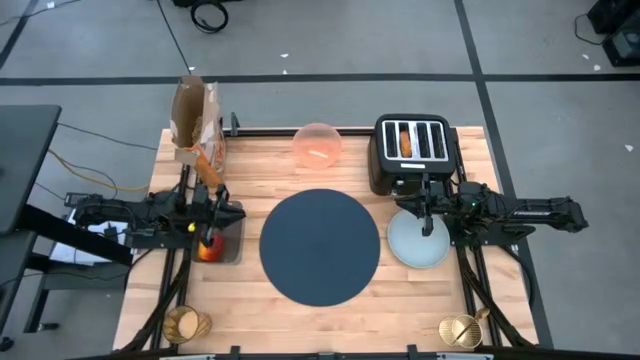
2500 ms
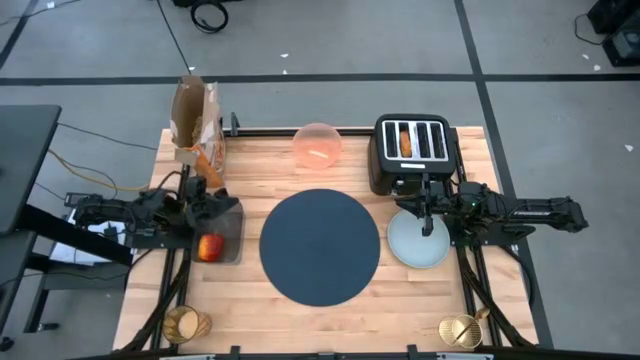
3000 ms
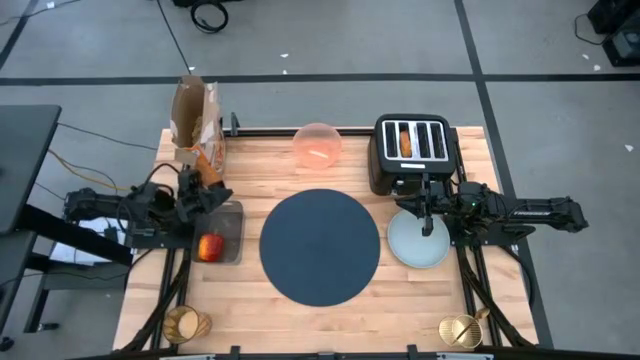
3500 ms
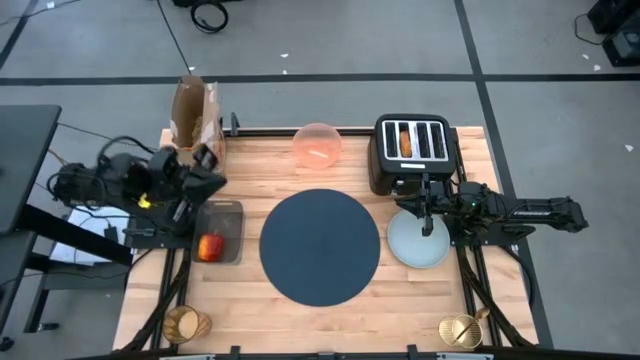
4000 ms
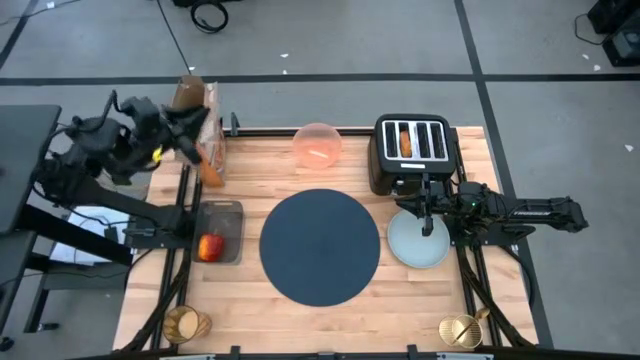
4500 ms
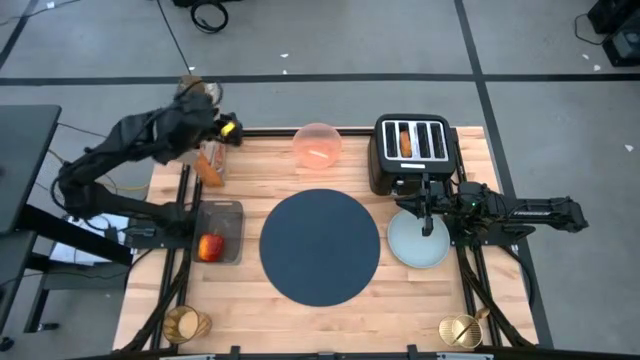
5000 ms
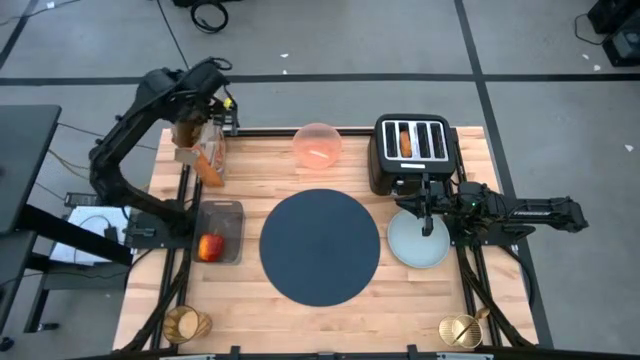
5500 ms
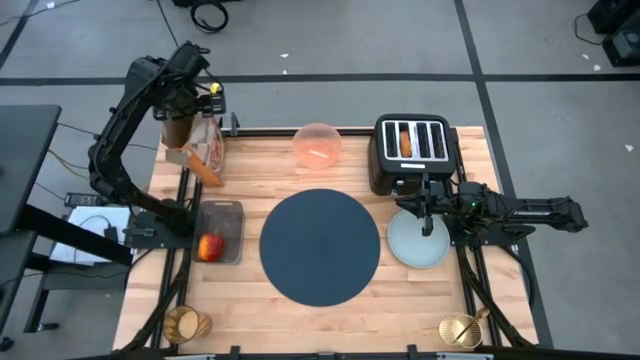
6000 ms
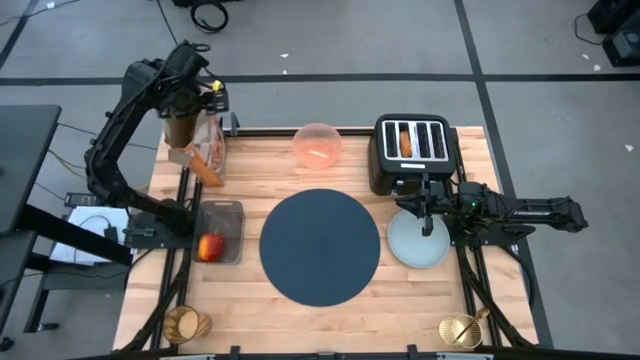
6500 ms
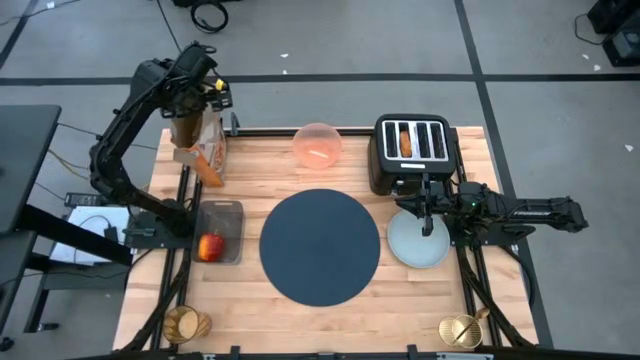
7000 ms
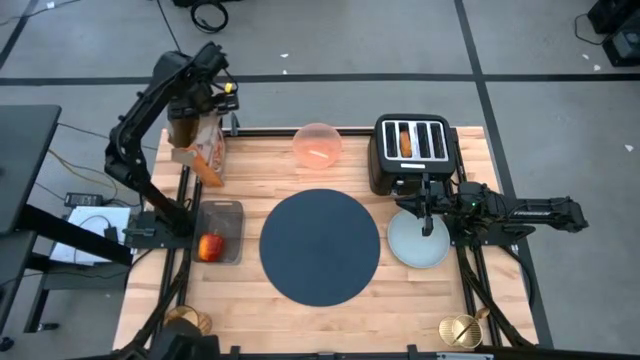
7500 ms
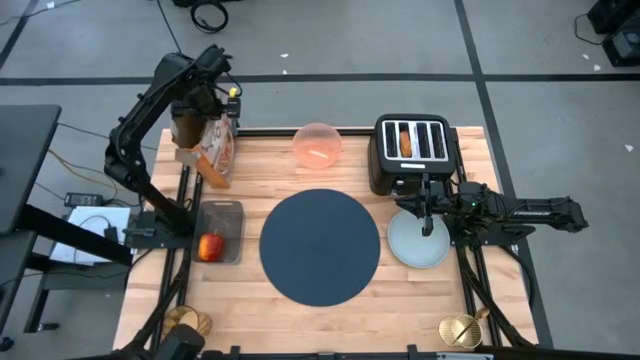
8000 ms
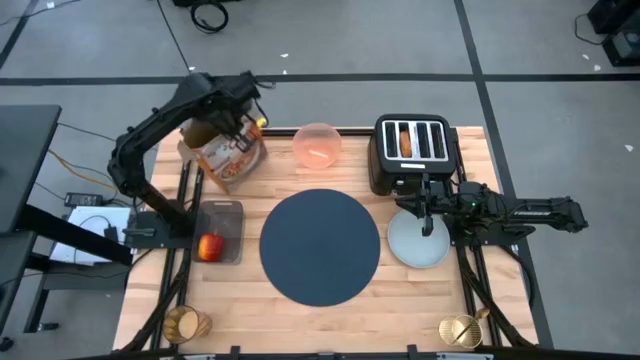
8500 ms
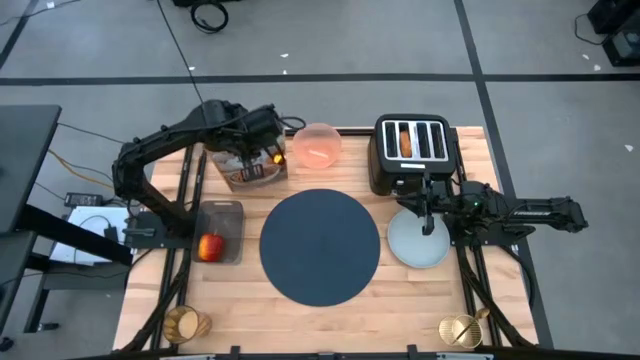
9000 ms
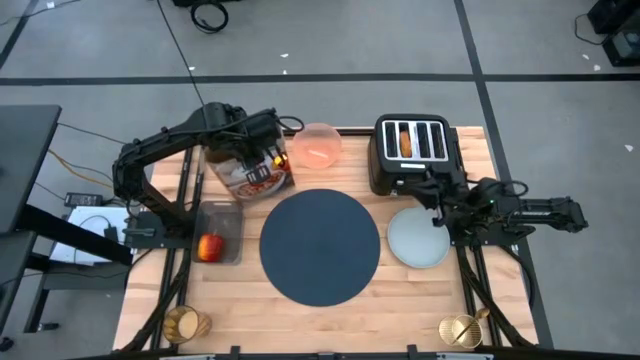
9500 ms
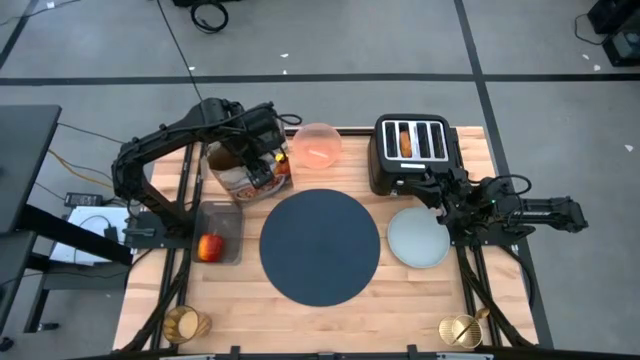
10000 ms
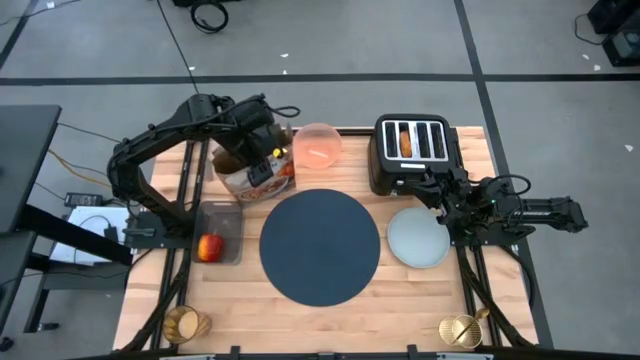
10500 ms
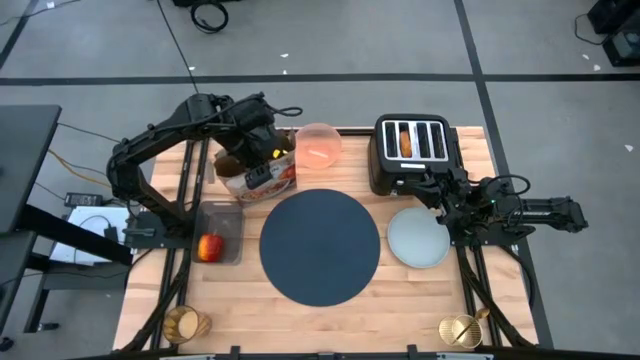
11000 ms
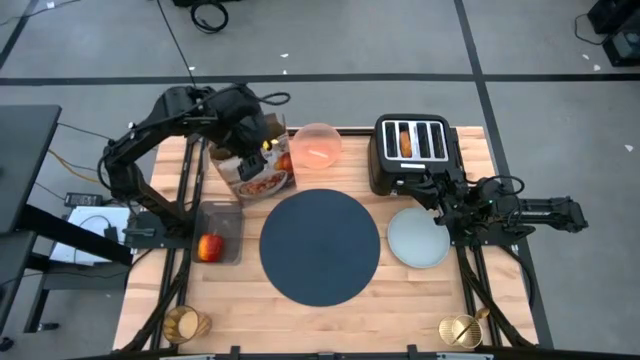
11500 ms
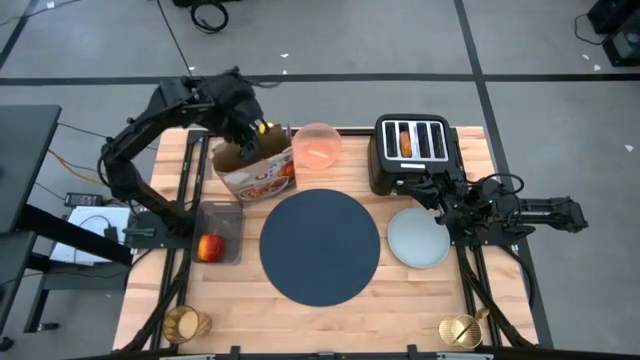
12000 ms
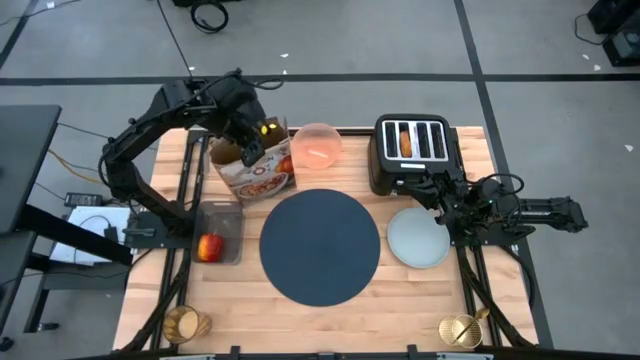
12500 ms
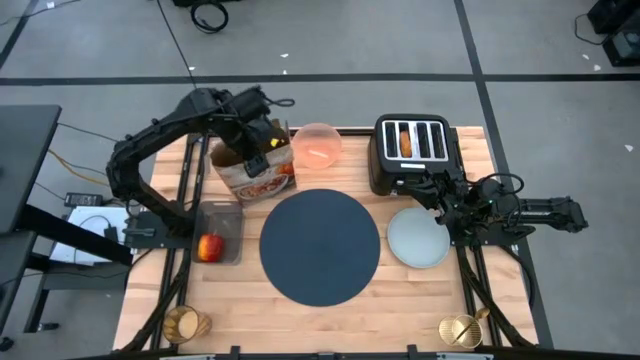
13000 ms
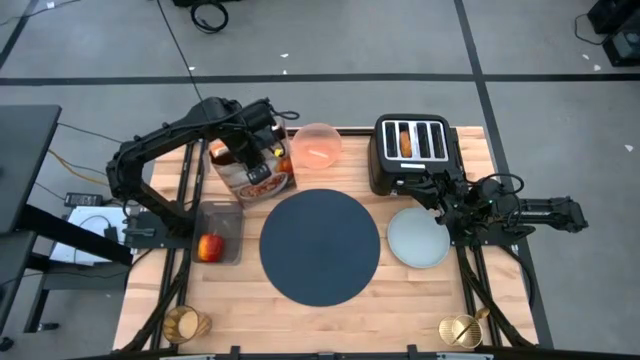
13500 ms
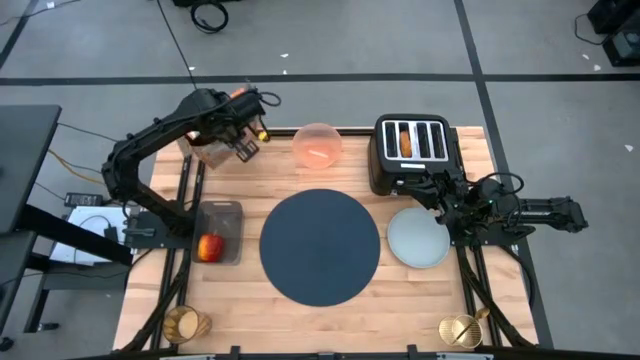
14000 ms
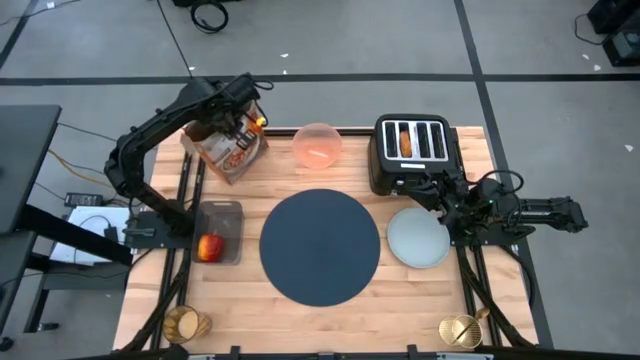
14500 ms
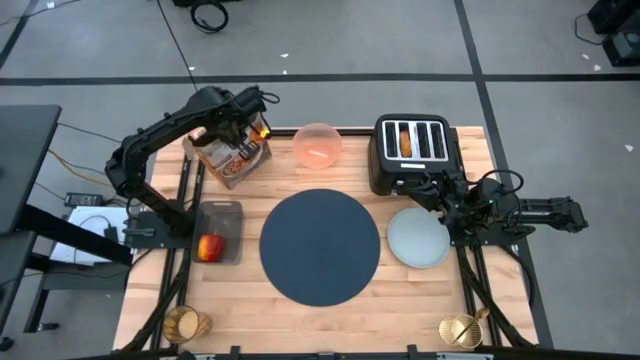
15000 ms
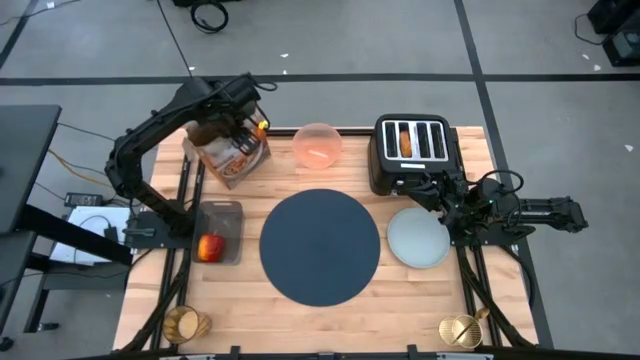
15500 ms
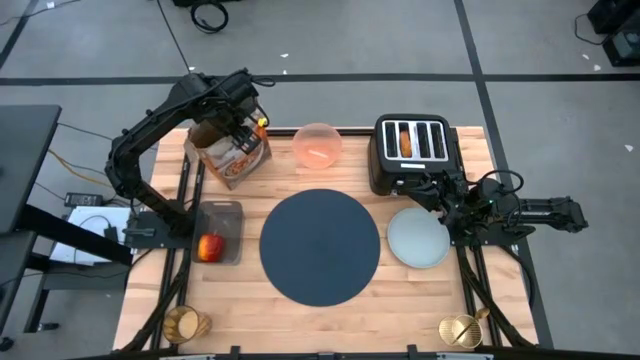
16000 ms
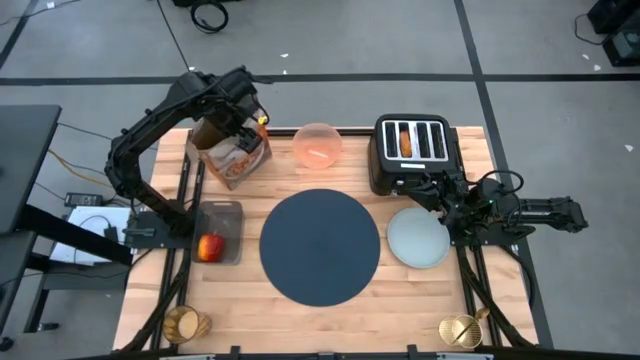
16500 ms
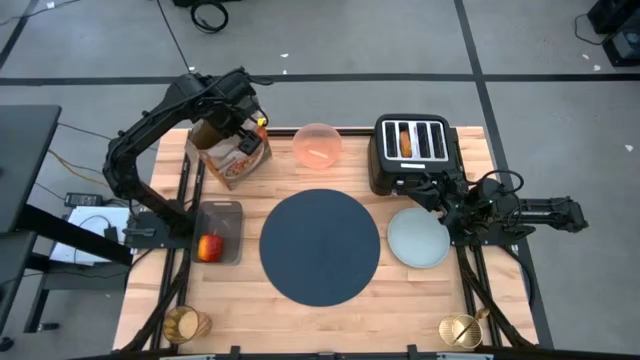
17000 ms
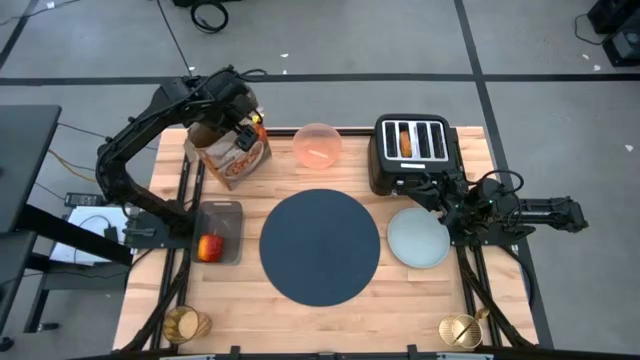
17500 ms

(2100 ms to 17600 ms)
Task: Arrange a breakfast setting
Adjust the orange cereal box

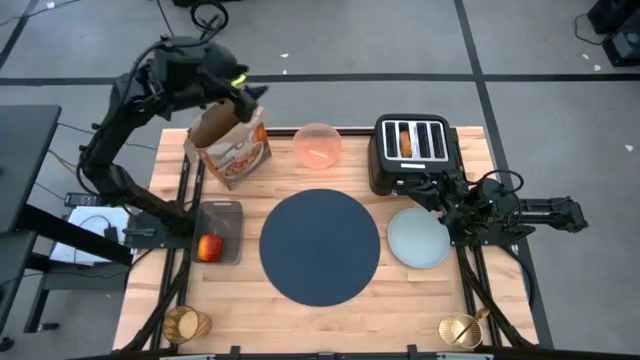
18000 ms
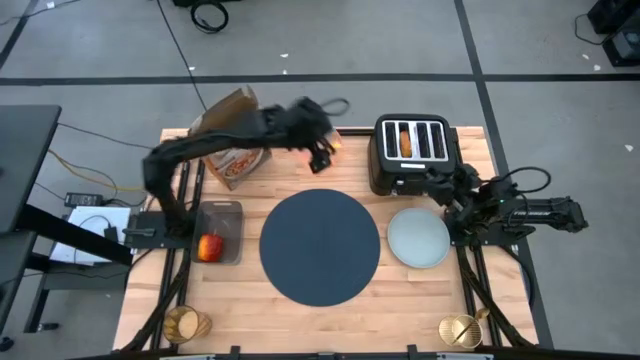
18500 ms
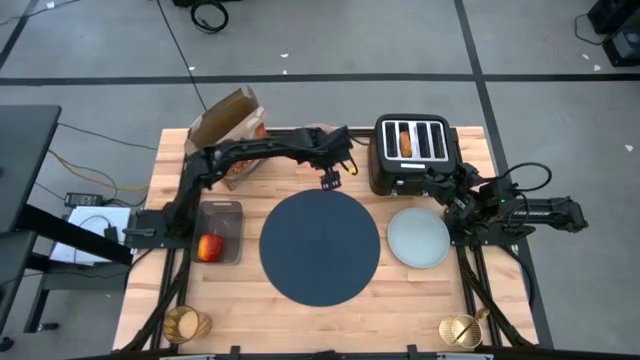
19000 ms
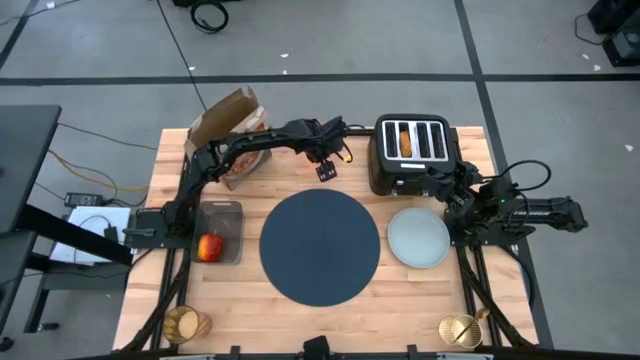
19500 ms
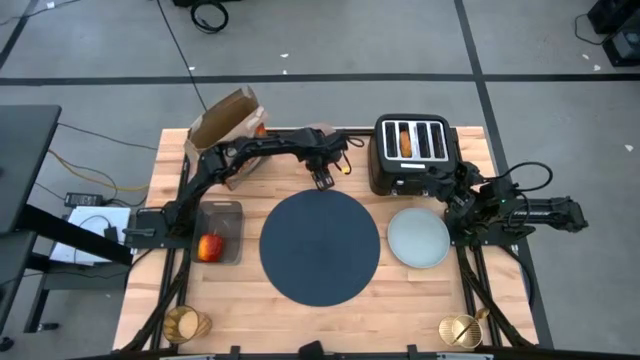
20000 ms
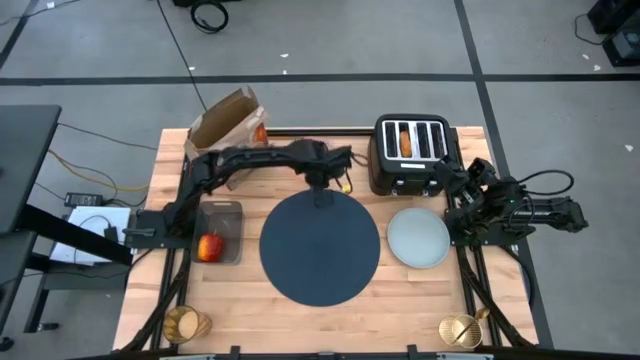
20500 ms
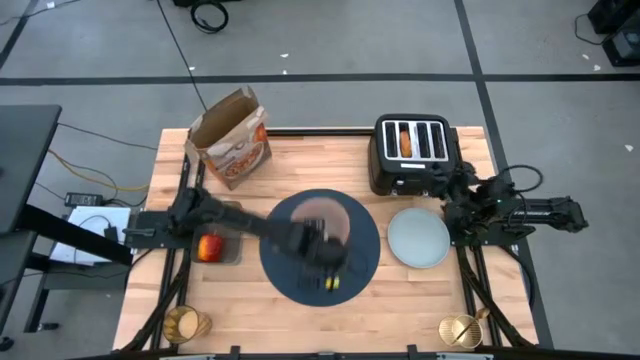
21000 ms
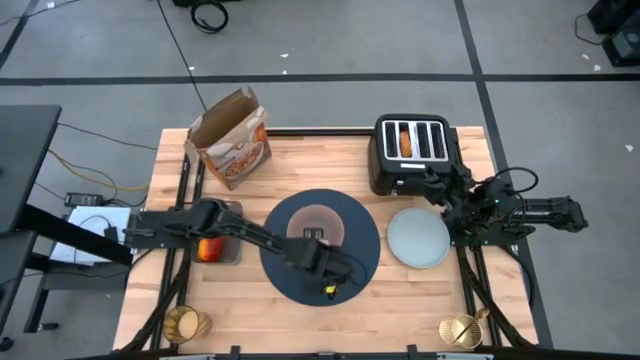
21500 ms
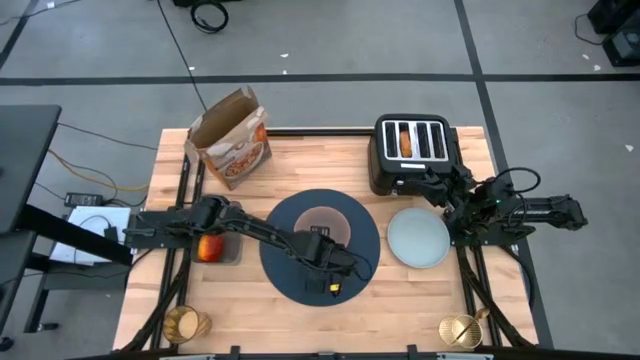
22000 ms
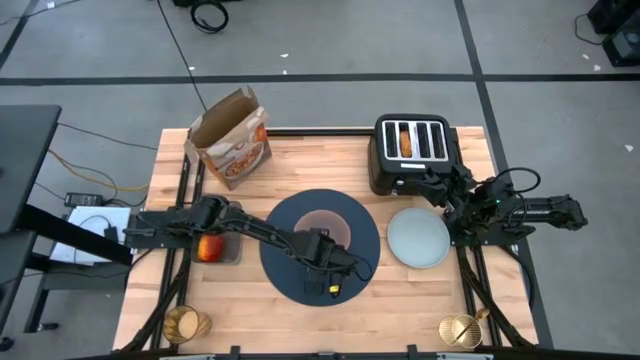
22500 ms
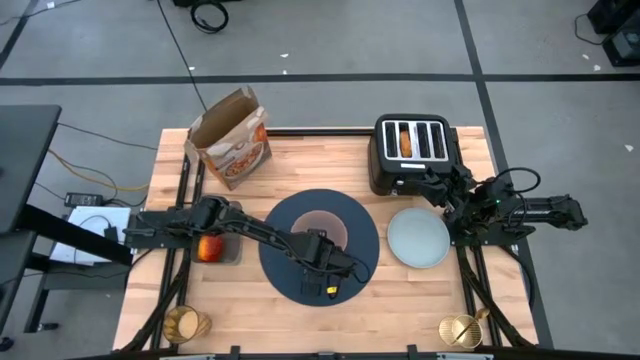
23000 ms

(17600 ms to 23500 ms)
Put the orange bowl on the blue tablemat
